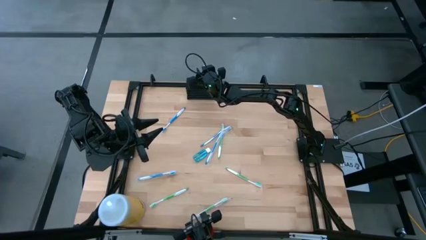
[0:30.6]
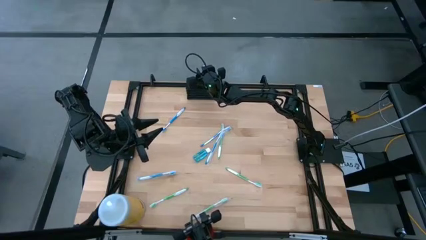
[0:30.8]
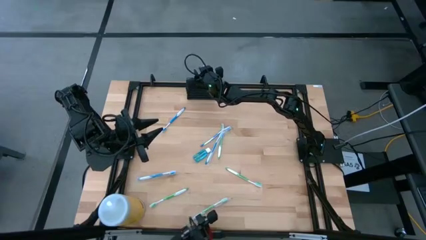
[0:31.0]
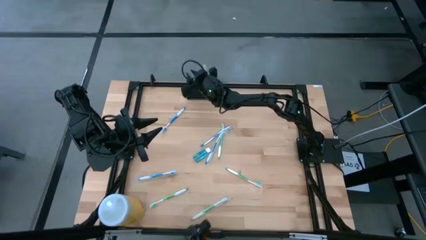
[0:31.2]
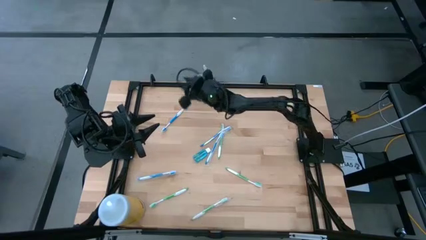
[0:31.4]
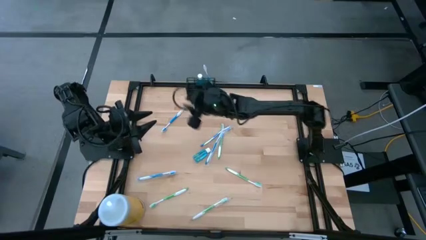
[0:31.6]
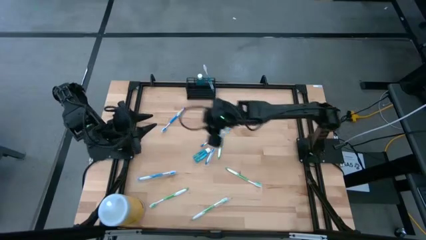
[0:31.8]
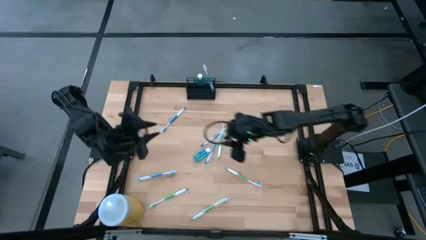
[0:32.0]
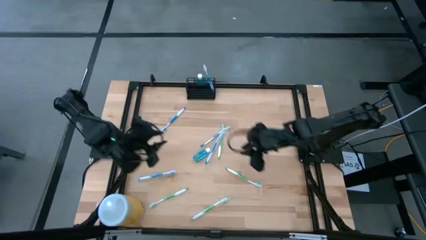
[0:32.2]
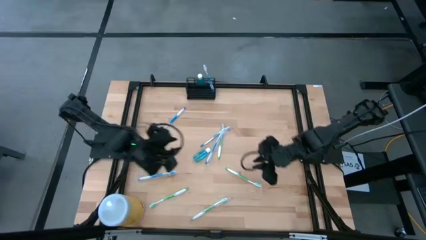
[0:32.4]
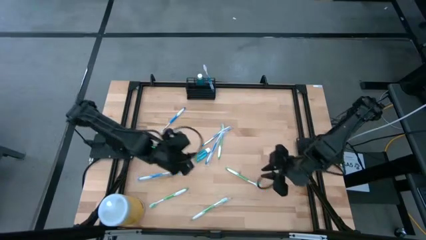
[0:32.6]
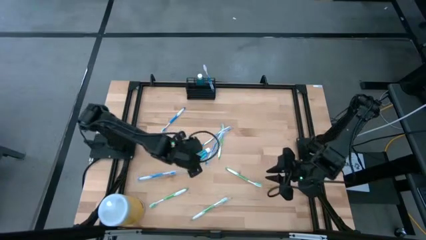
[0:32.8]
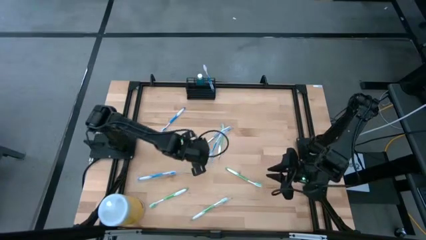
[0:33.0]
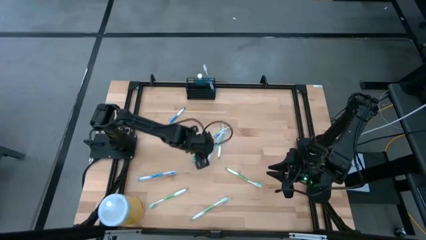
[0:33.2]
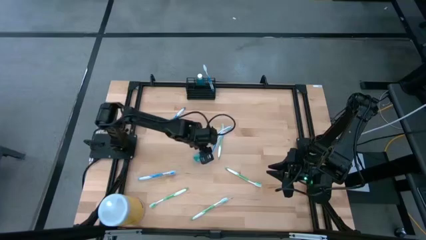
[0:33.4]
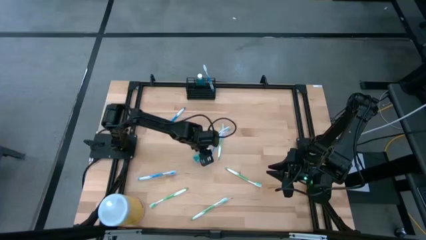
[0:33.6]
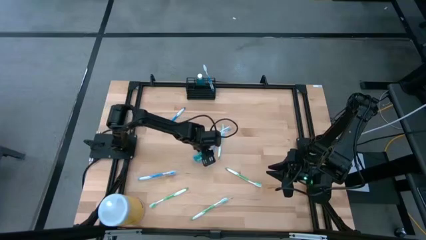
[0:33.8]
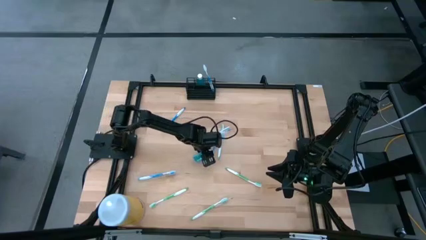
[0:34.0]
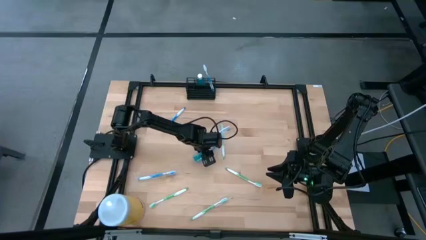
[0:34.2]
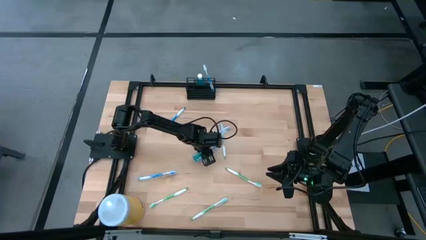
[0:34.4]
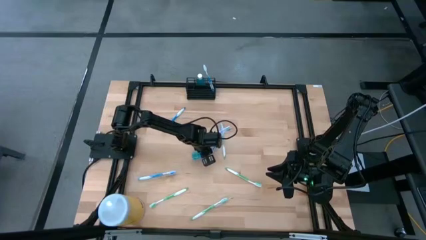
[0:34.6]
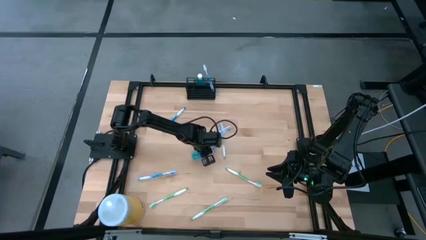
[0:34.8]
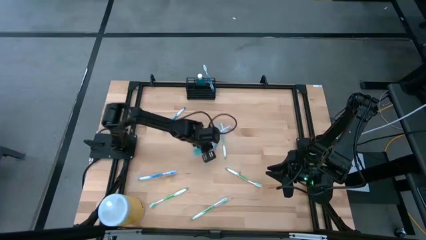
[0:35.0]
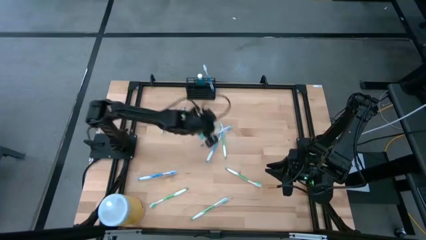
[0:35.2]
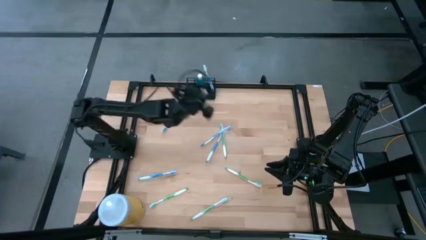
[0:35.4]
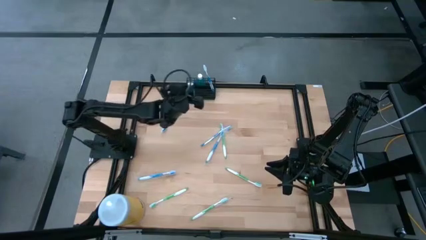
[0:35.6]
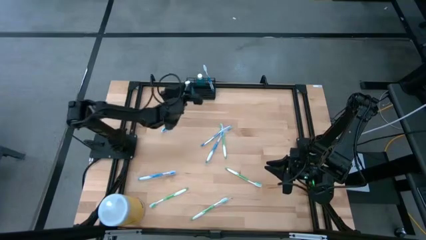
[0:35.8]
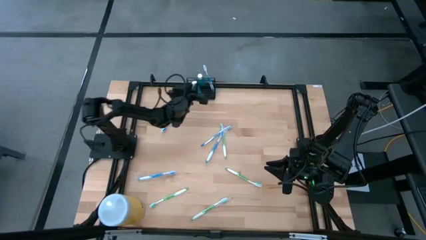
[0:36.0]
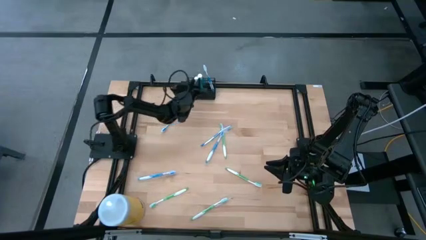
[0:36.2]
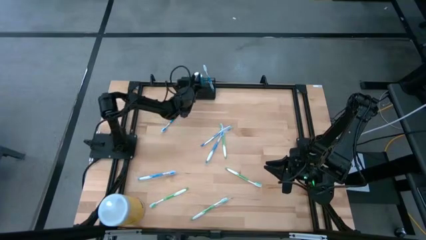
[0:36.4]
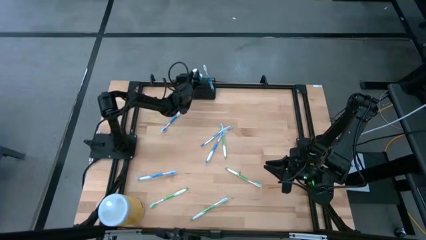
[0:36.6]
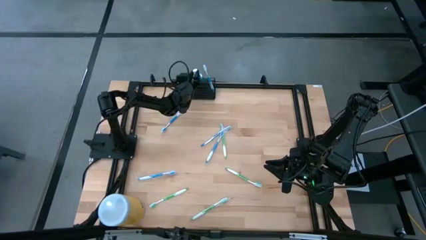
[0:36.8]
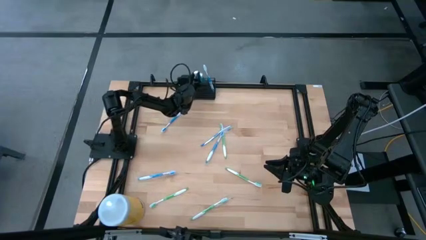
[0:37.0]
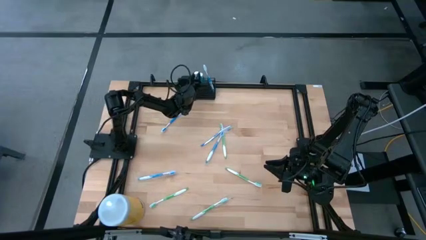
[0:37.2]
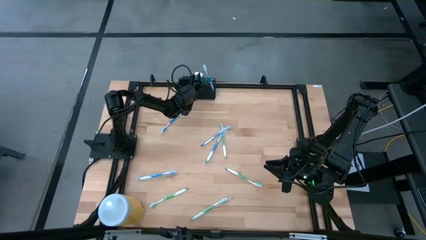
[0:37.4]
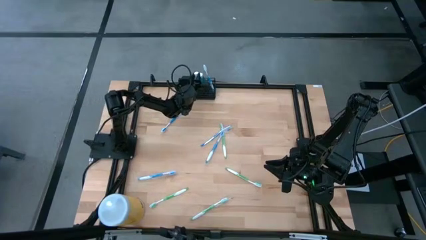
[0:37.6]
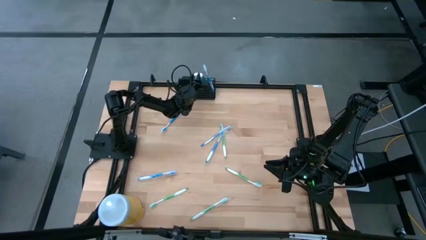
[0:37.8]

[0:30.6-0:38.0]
Task: Pick & Place toothbrushing station
Put the mouthwash into the wire organizer

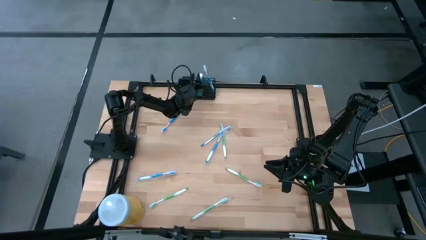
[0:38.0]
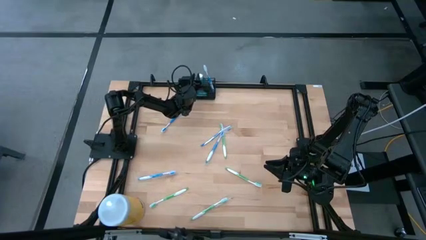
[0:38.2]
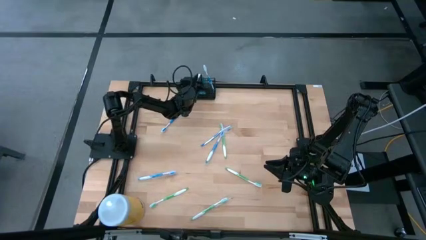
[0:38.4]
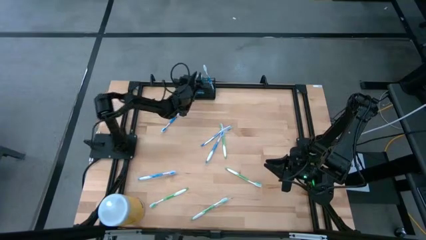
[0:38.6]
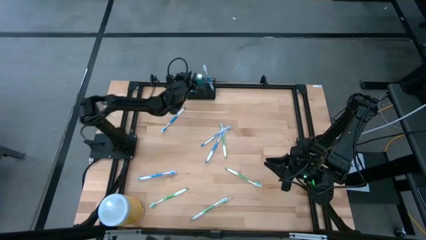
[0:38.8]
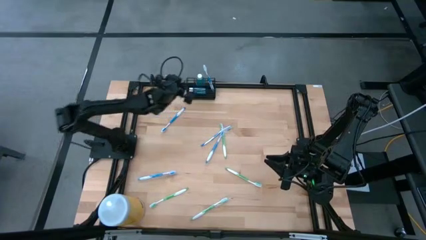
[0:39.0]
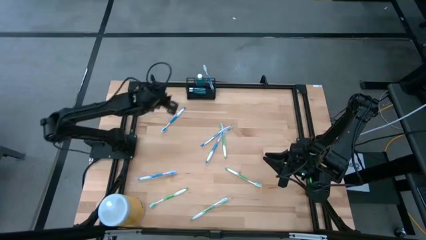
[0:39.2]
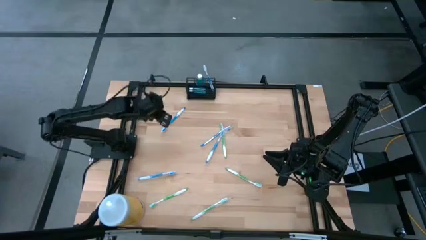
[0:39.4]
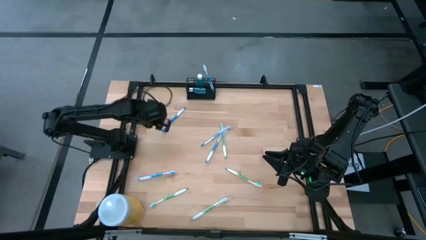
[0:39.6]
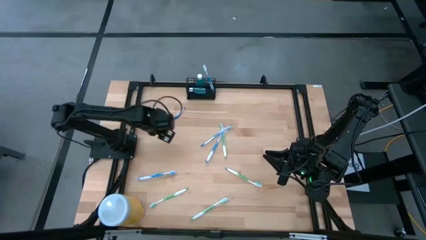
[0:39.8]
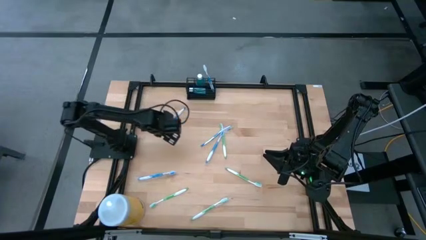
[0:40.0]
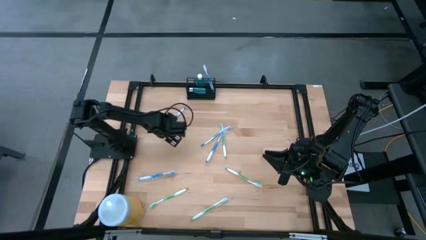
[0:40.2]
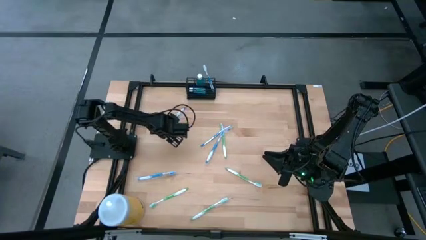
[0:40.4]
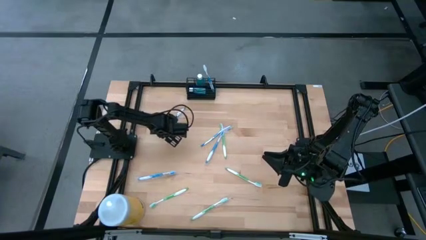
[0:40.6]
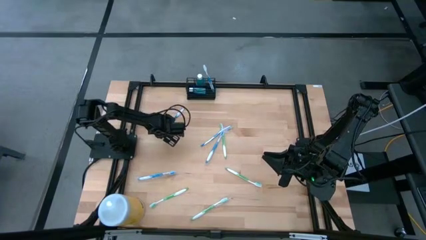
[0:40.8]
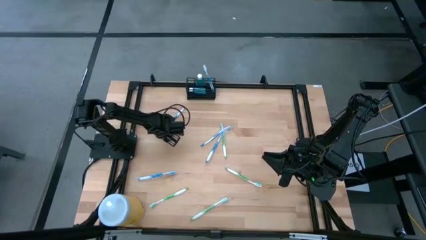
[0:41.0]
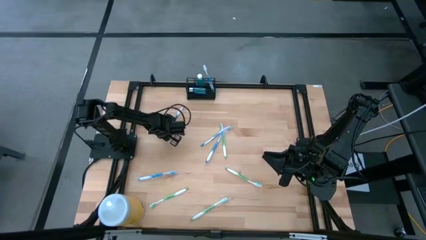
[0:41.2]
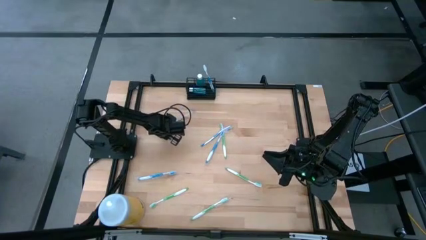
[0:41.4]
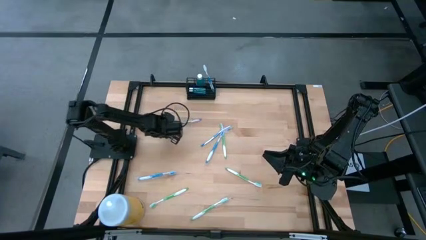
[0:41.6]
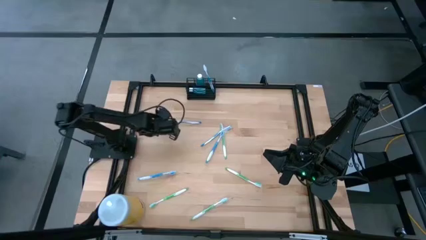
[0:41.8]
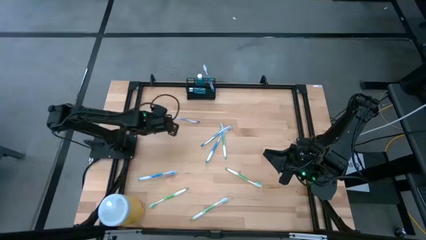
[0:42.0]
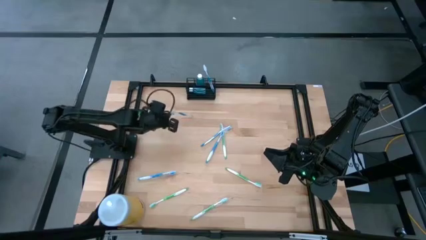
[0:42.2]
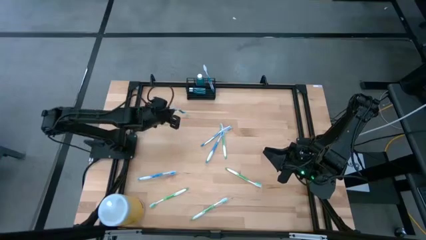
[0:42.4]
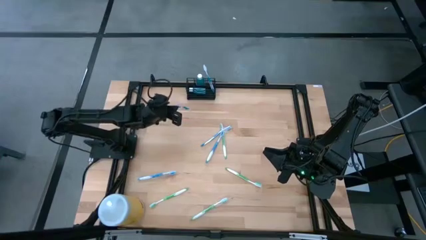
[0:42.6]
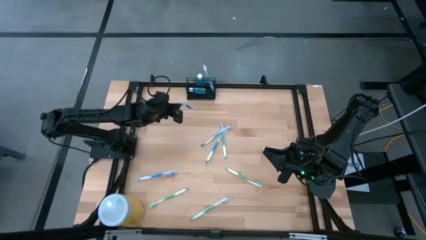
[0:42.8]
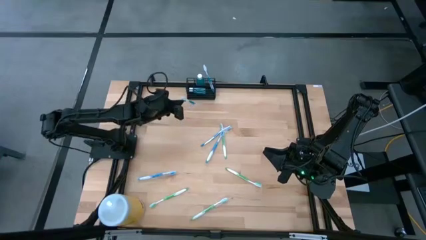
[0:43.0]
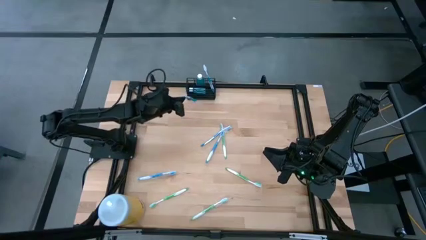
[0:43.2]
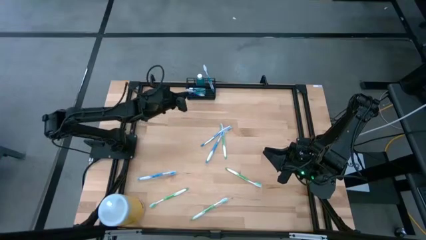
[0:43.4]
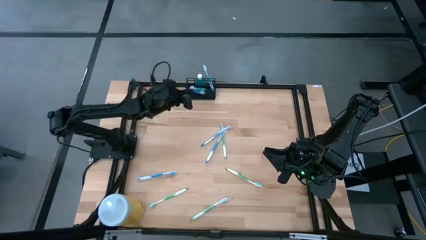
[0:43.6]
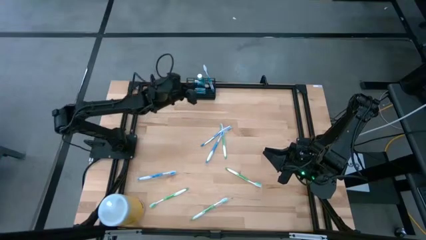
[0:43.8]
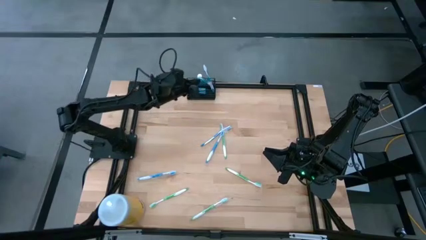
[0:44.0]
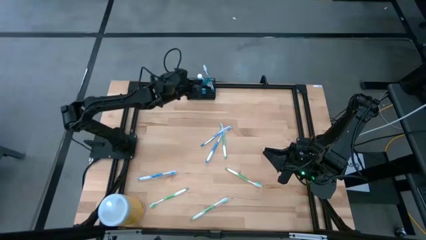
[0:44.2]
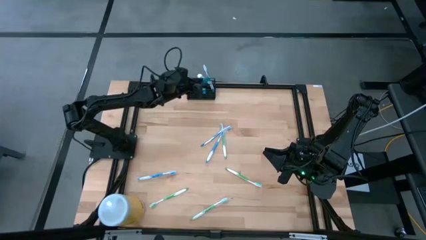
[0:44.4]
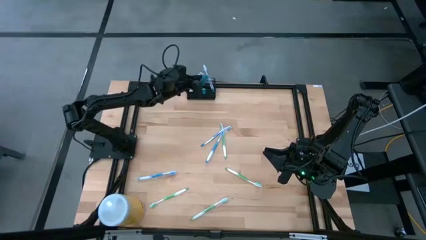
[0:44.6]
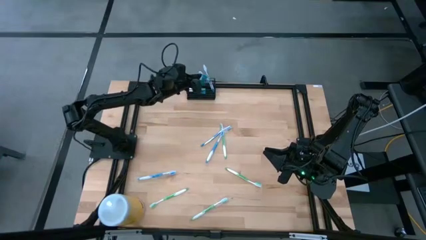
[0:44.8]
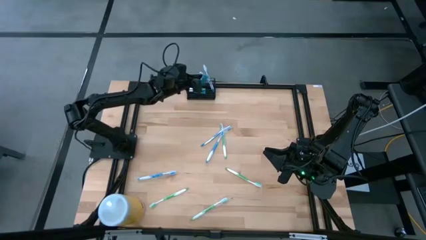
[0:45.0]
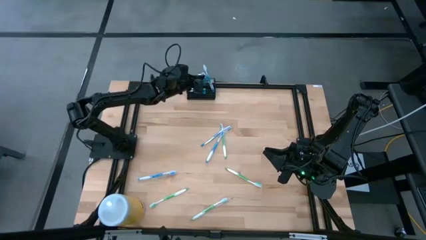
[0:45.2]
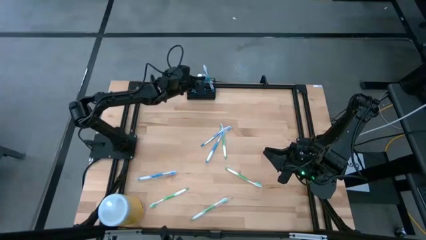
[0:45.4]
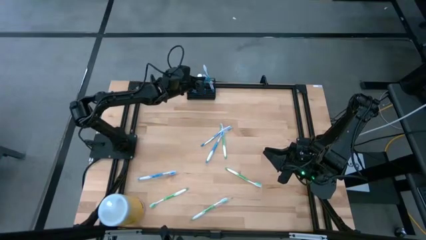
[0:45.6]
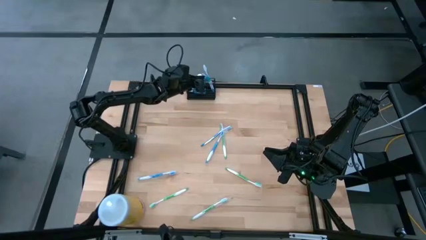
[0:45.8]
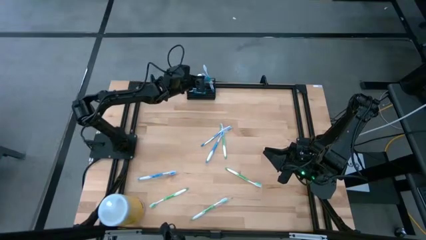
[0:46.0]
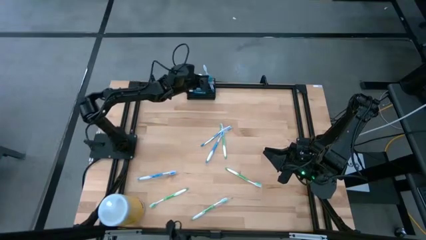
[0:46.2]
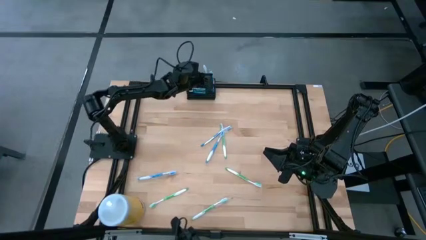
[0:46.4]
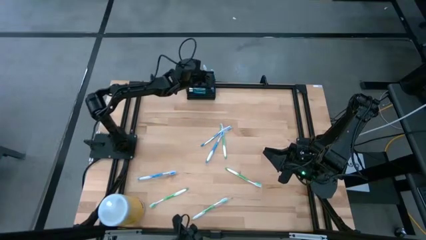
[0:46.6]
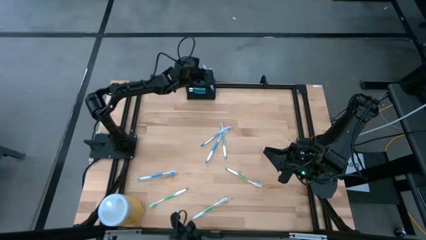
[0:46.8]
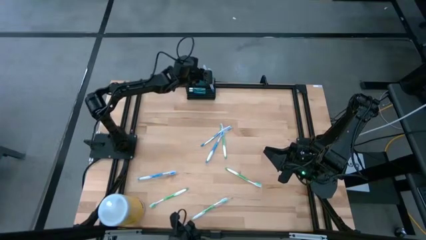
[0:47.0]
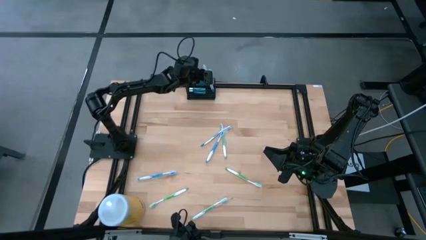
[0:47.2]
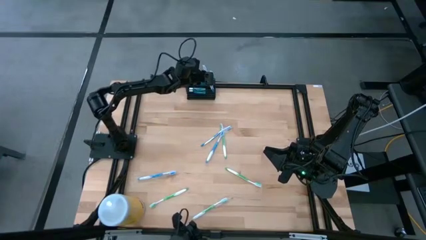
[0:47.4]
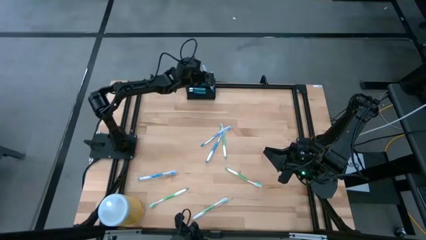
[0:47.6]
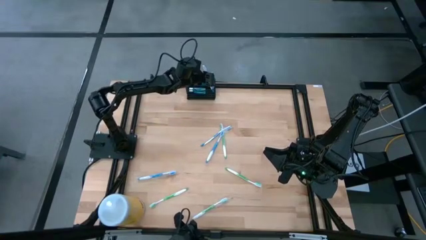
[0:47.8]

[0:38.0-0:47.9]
Put the blue toothbrush into the wire organizer
